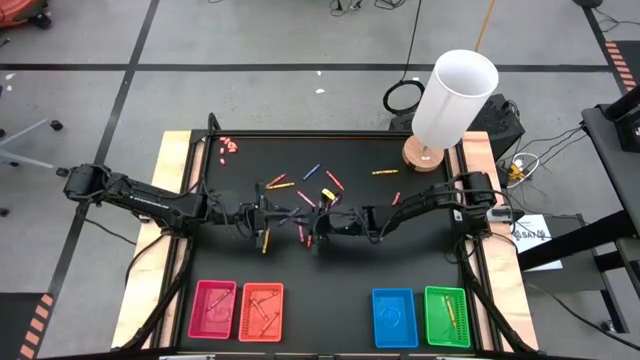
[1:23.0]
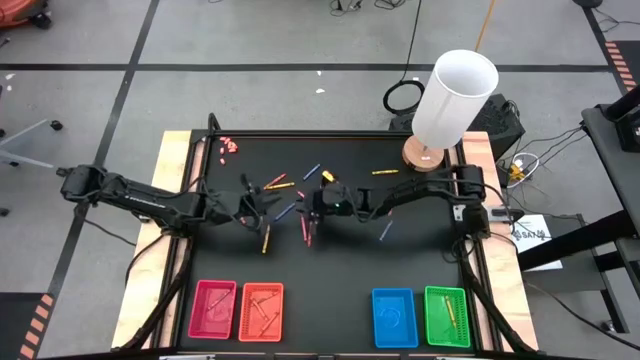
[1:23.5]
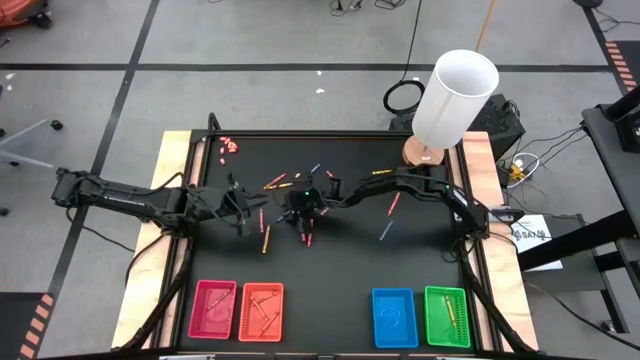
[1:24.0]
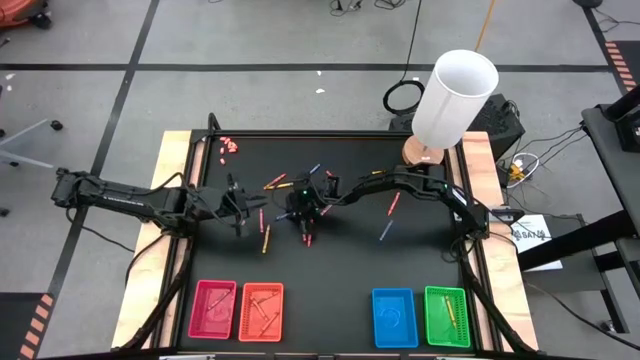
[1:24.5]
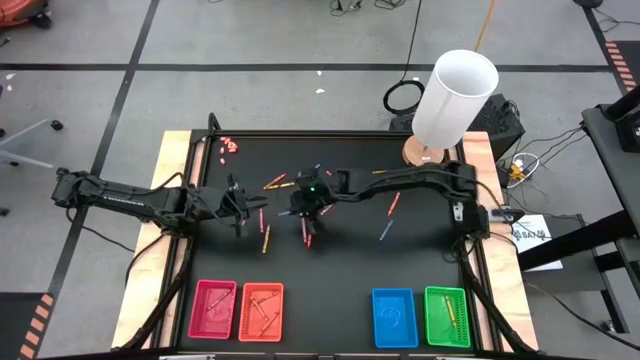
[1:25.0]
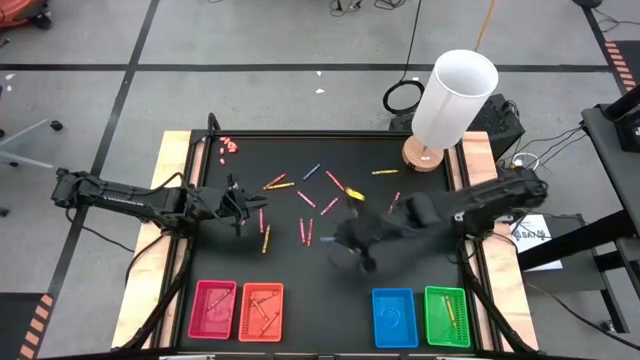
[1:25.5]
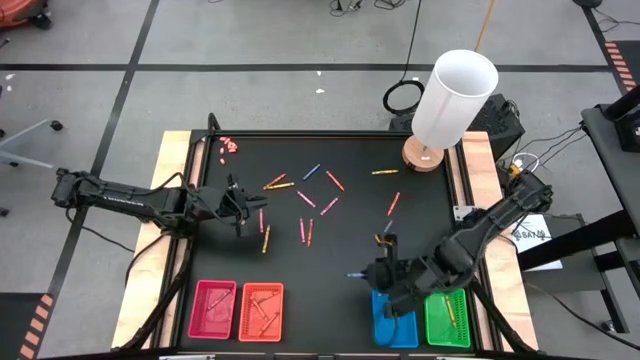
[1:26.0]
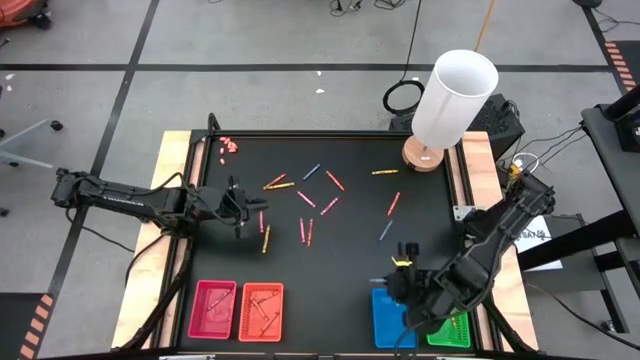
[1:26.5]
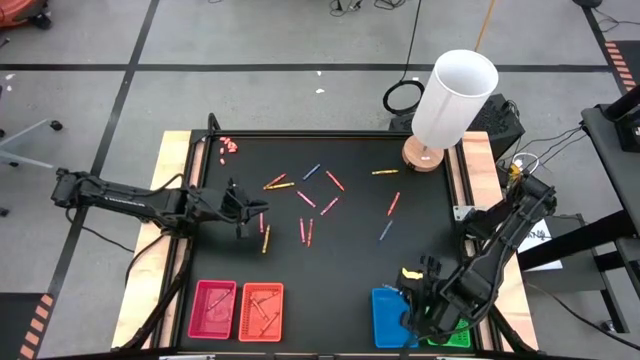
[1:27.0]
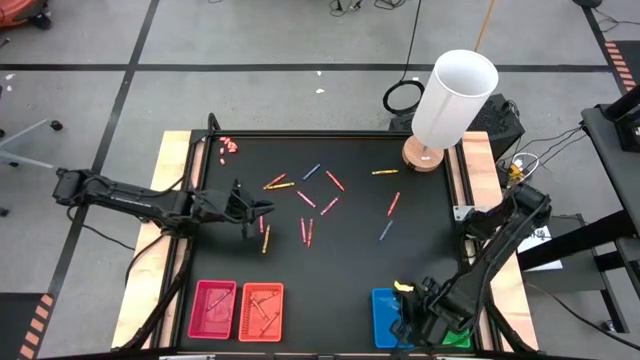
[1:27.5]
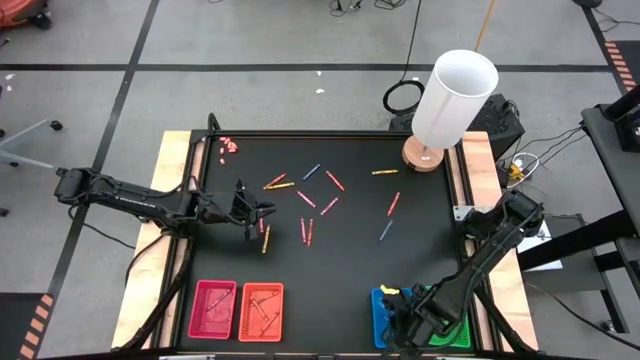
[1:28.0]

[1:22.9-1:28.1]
Task: Sort crayons
Put the blue crayon into the blue bin

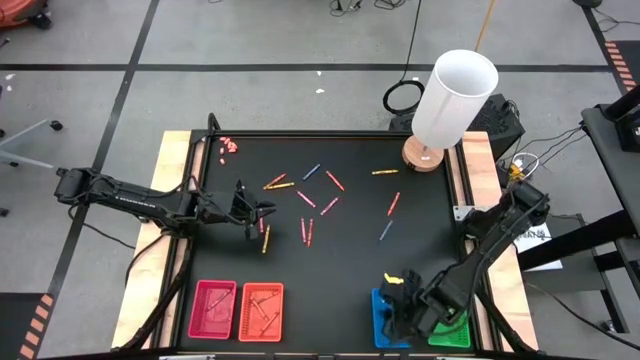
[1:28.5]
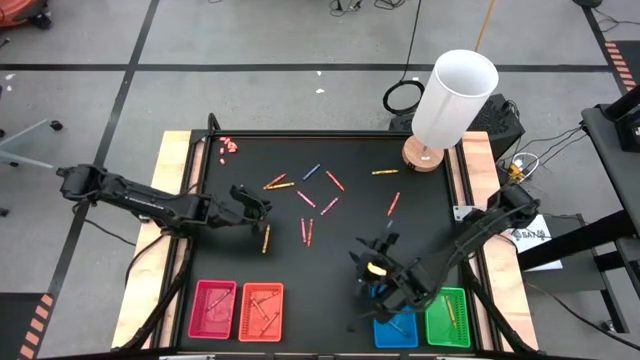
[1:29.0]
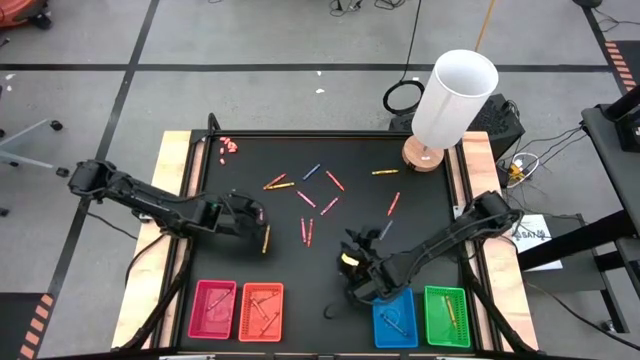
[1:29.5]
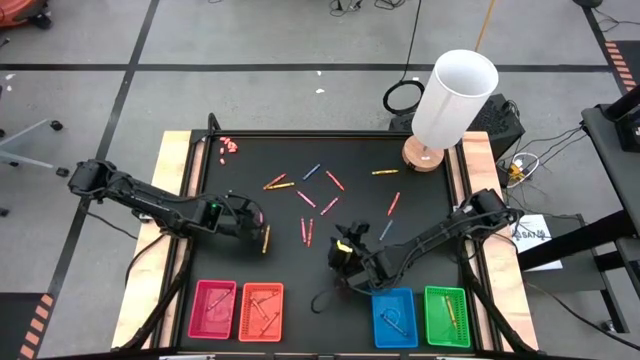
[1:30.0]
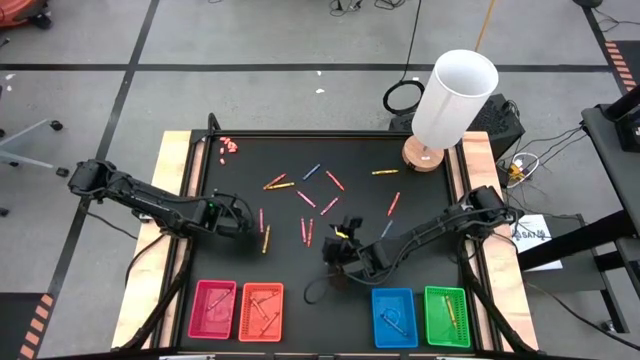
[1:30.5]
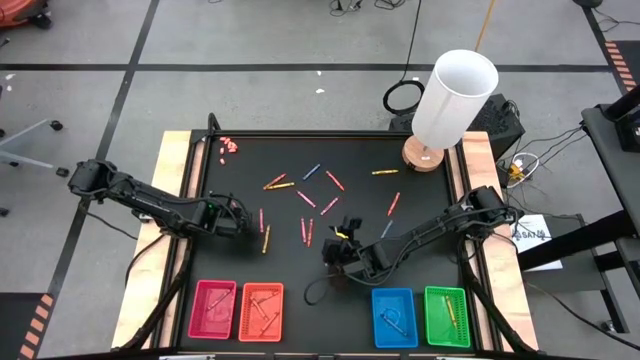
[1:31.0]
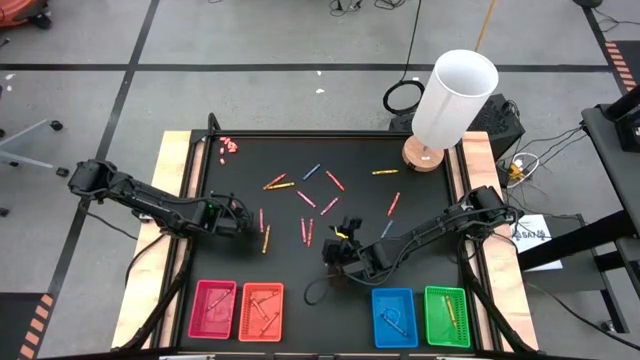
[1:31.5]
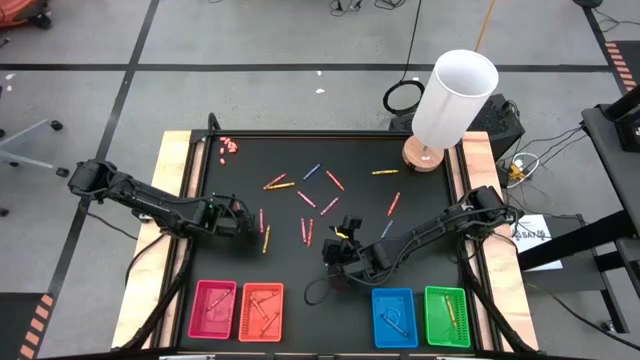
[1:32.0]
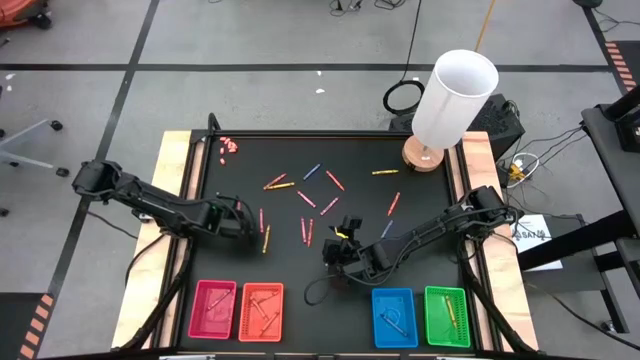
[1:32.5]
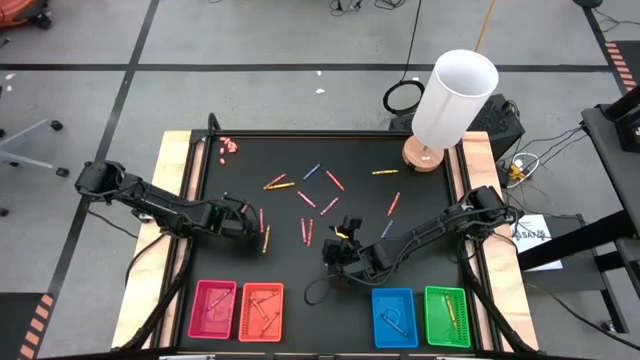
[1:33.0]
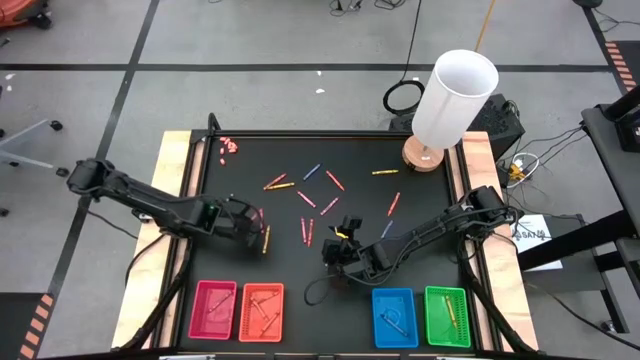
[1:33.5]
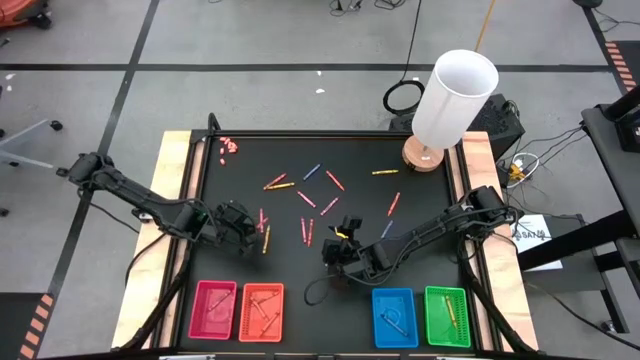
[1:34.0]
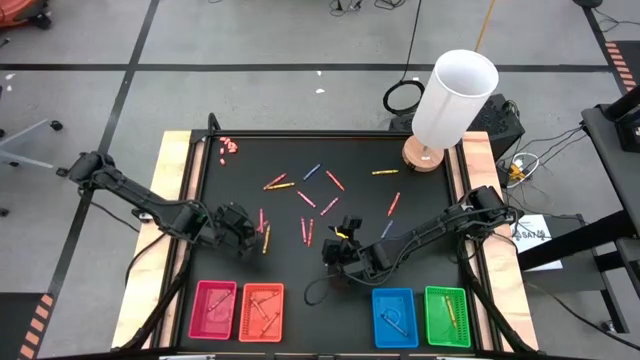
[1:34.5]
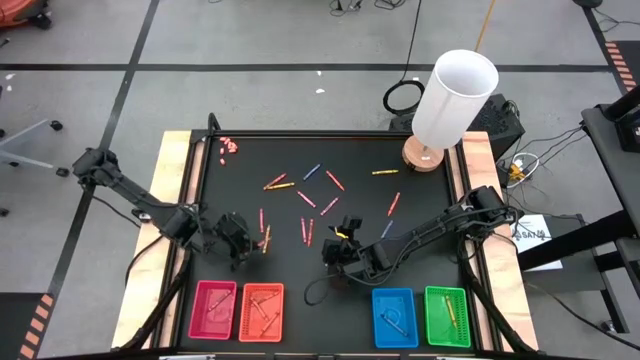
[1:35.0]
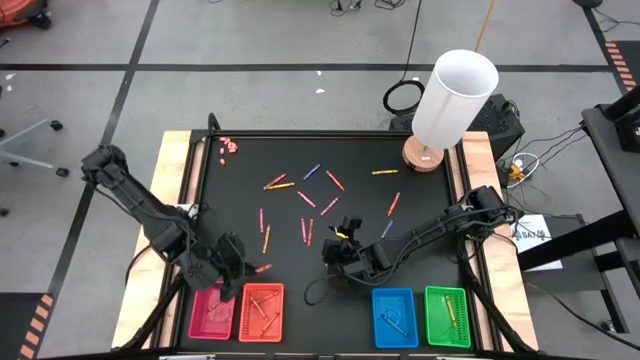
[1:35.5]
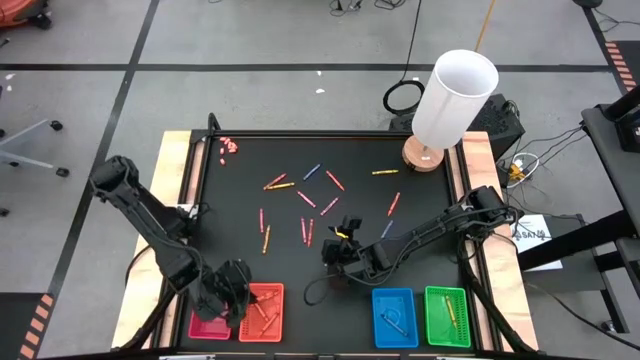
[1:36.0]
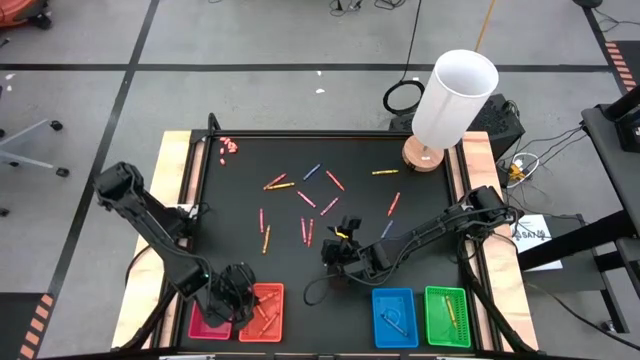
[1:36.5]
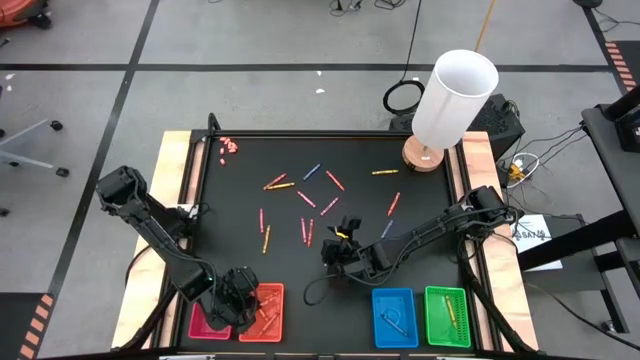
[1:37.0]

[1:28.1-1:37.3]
Put the orange crayon into the orange bin

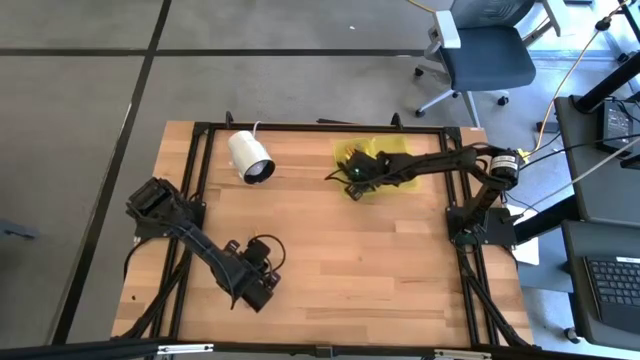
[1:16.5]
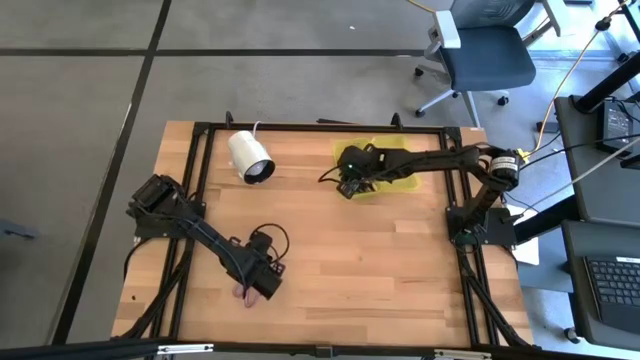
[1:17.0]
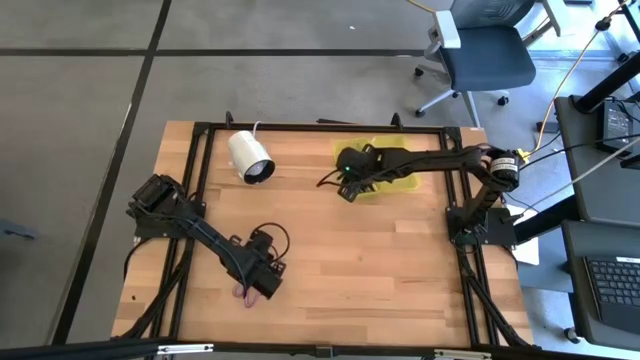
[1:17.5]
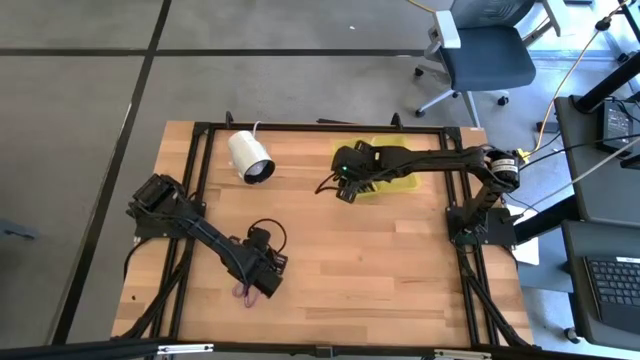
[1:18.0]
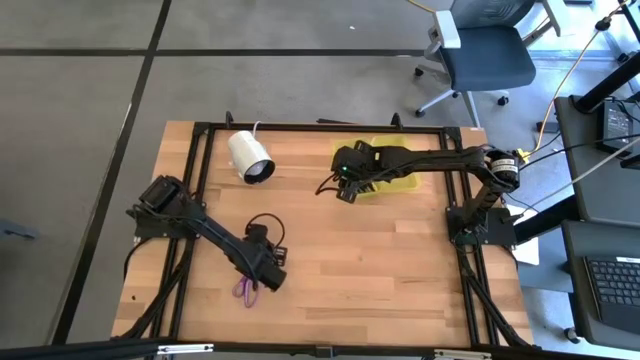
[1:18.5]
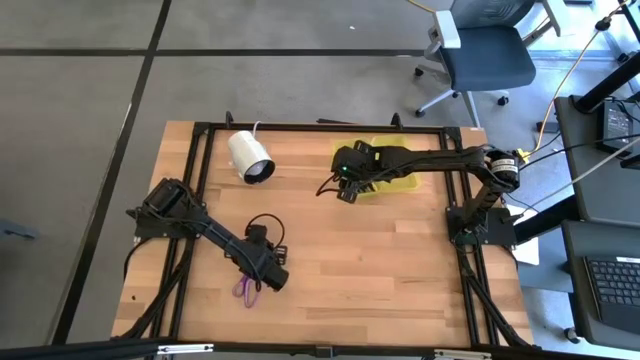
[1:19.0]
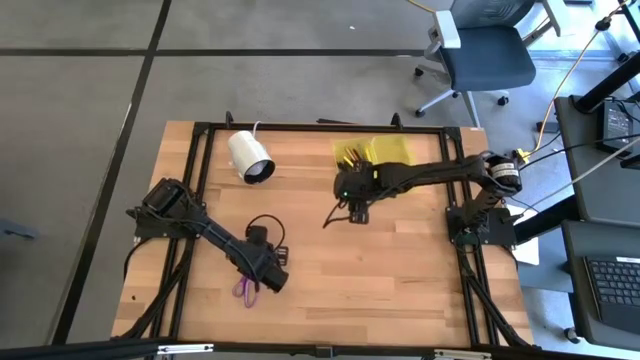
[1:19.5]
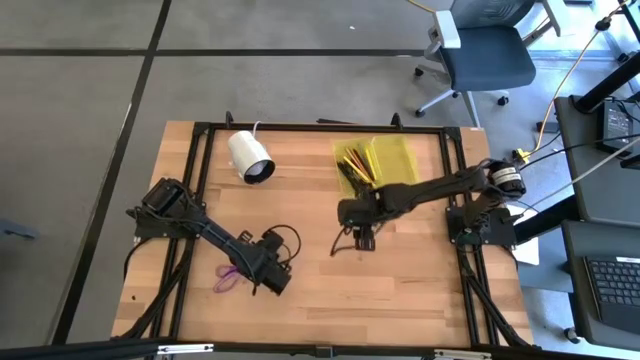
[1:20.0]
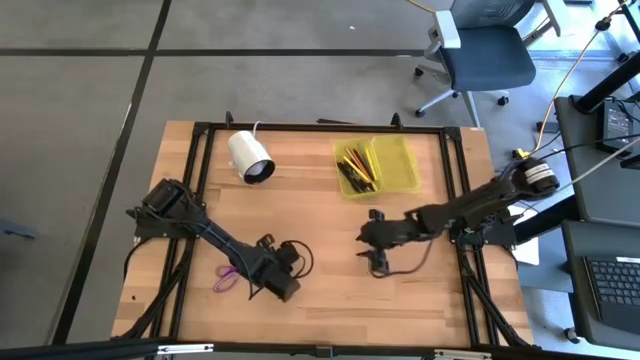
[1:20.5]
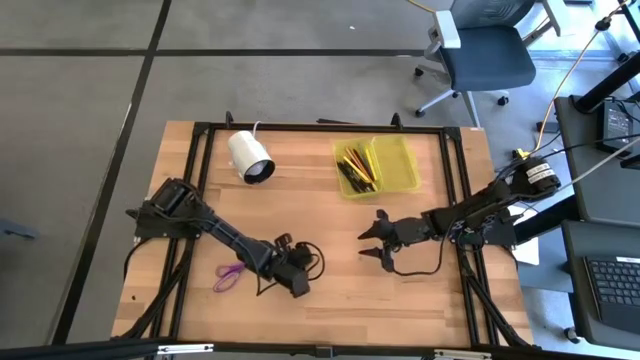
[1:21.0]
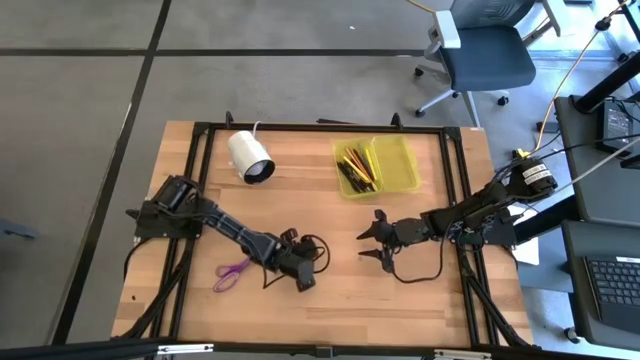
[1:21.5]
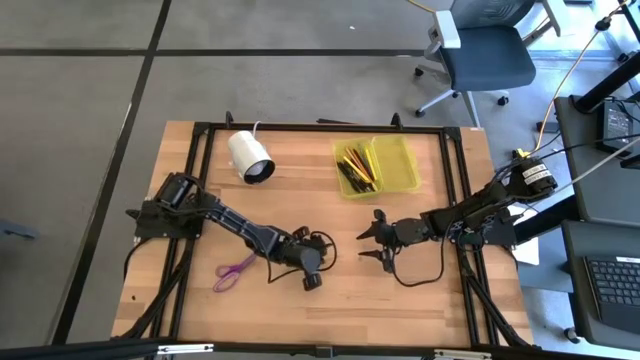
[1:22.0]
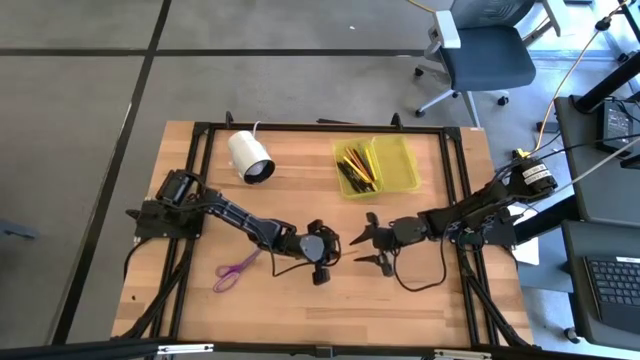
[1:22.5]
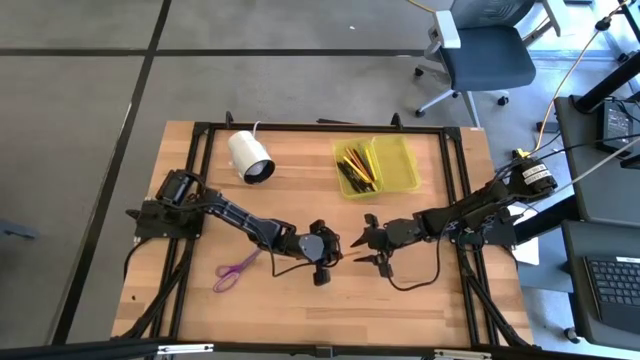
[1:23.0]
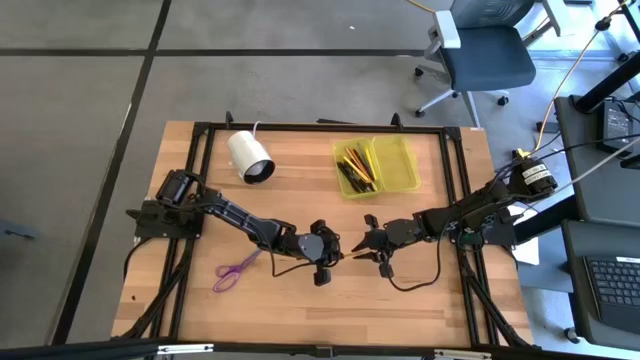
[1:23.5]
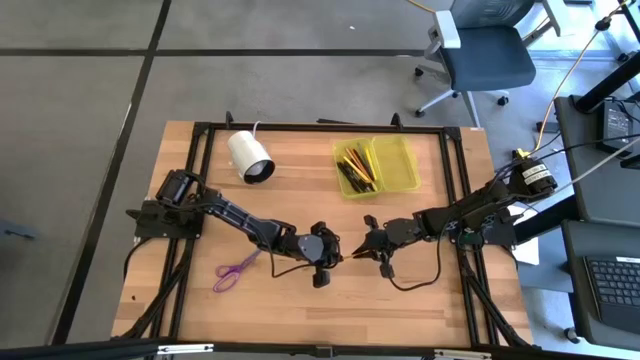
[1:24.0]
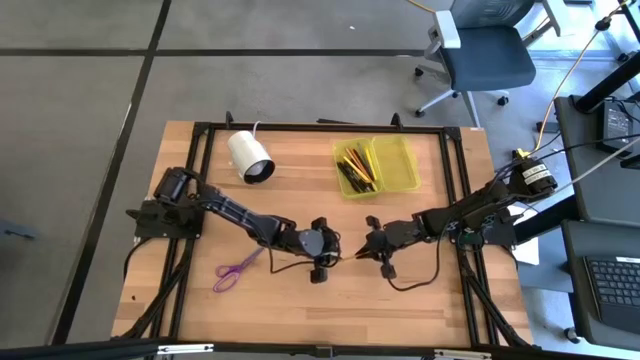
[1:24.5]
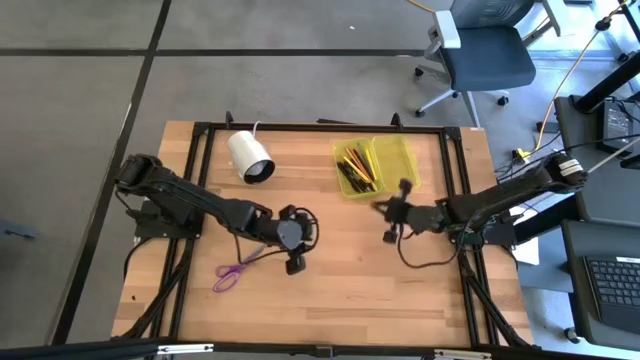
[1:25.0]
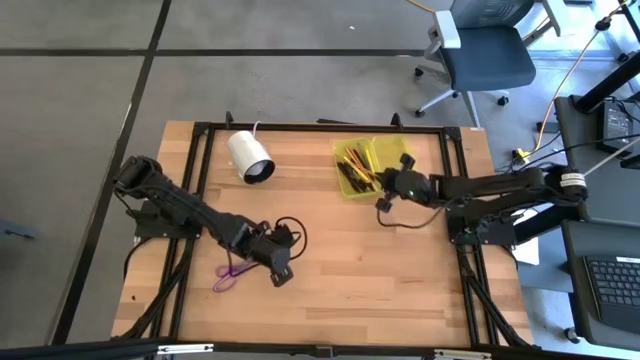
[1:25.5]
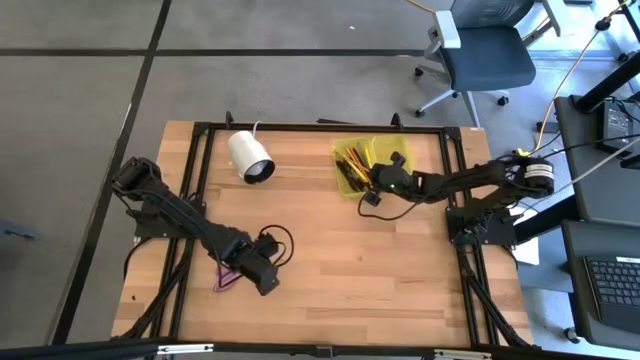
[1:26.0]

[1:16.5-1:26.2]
Task: Pick & place school supplies into a supply box
Put the yellow pencil into the yellow supply box
